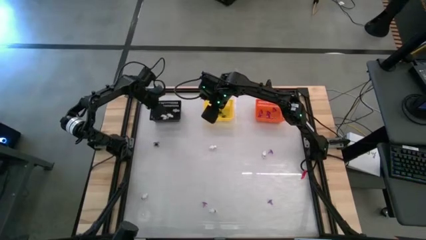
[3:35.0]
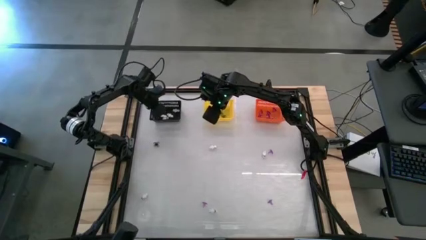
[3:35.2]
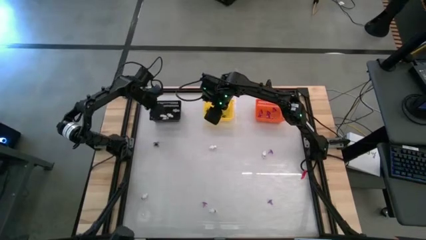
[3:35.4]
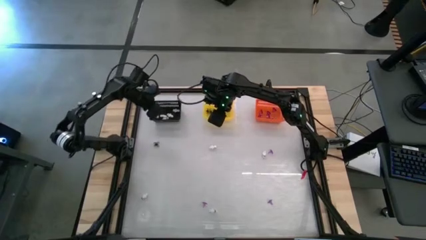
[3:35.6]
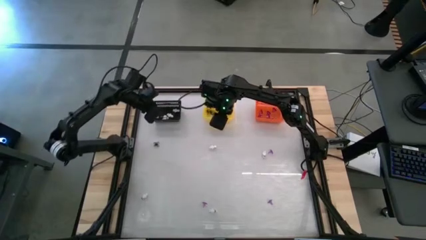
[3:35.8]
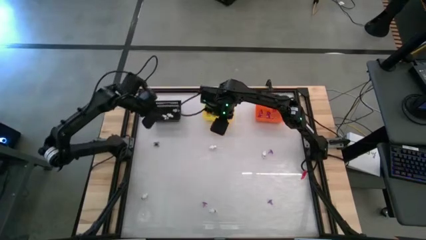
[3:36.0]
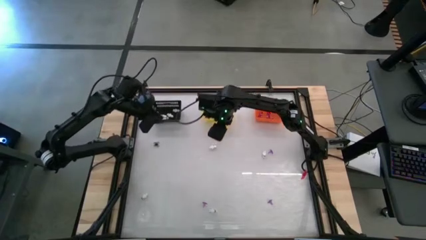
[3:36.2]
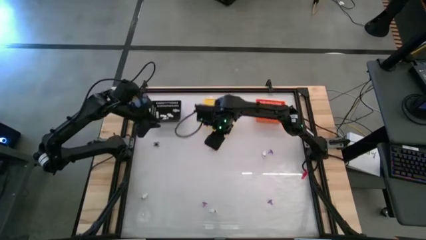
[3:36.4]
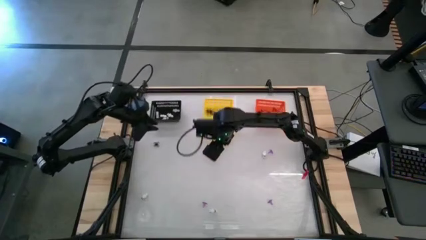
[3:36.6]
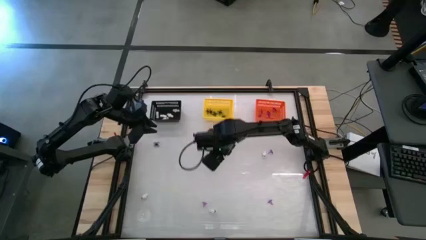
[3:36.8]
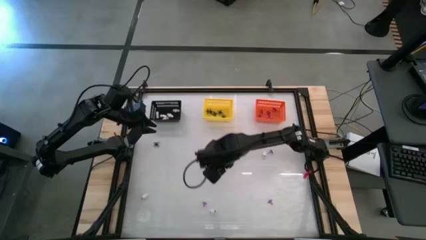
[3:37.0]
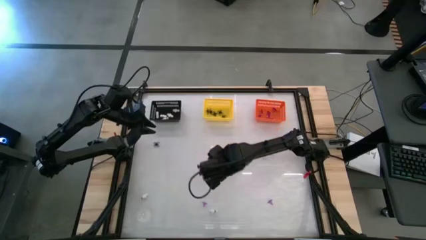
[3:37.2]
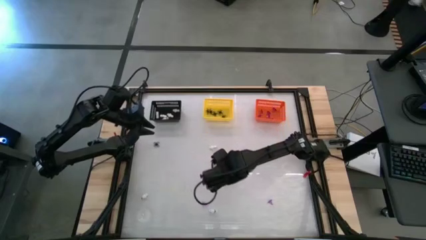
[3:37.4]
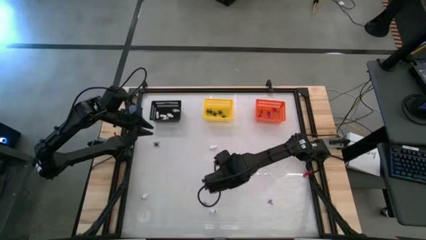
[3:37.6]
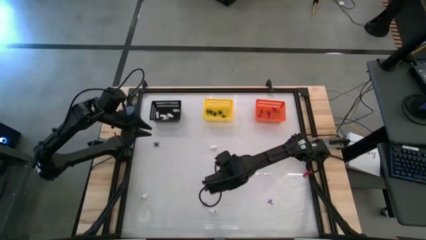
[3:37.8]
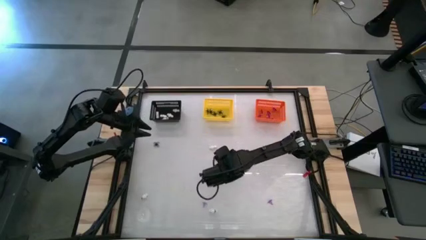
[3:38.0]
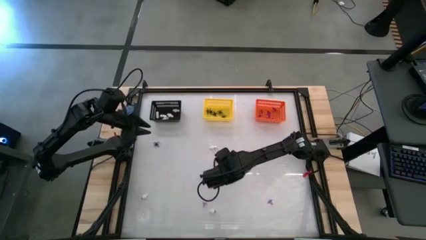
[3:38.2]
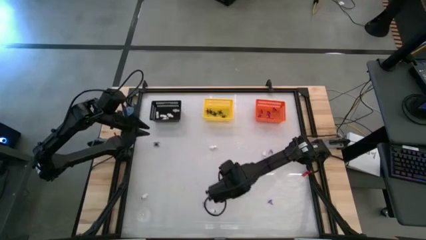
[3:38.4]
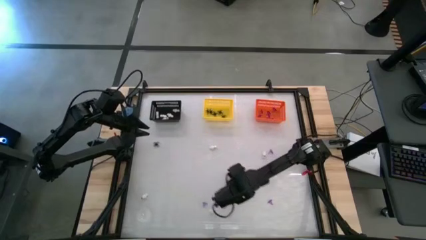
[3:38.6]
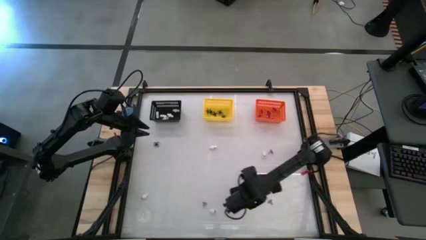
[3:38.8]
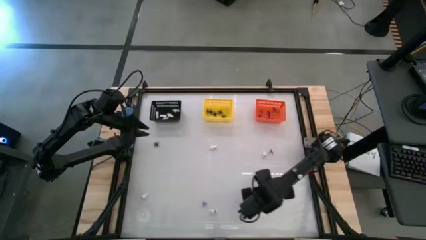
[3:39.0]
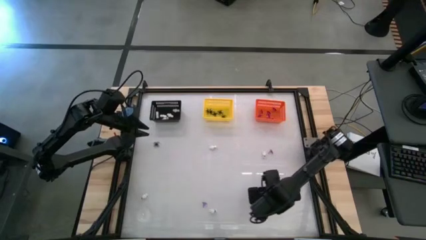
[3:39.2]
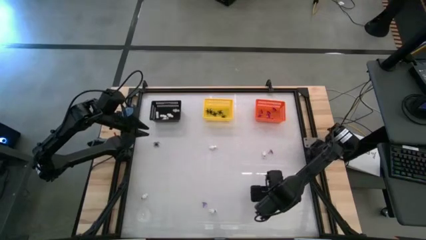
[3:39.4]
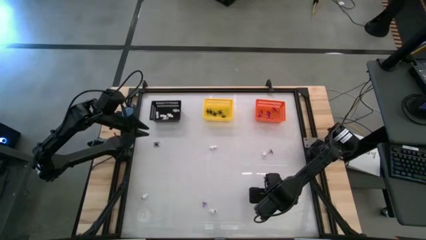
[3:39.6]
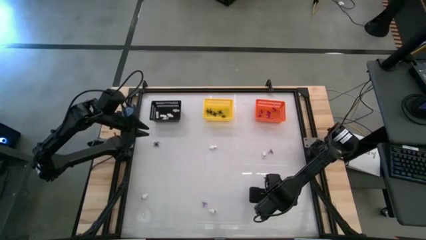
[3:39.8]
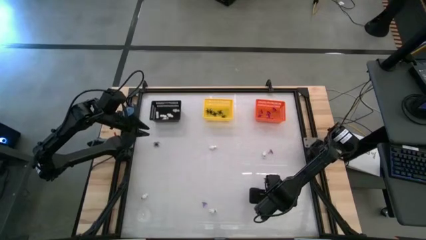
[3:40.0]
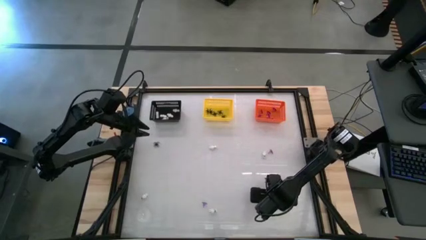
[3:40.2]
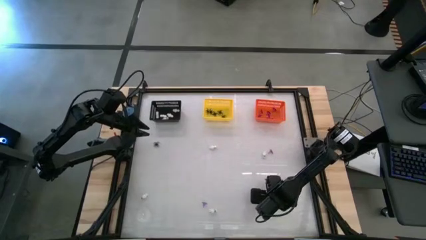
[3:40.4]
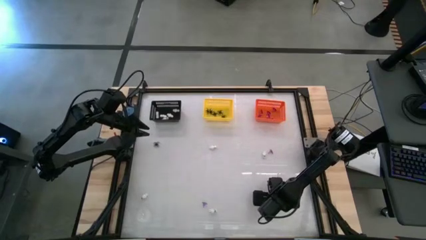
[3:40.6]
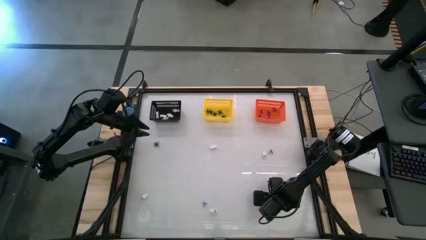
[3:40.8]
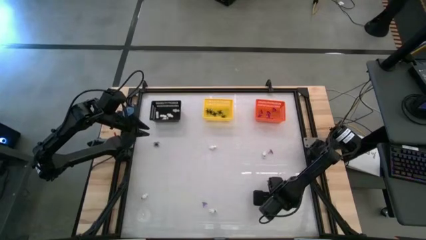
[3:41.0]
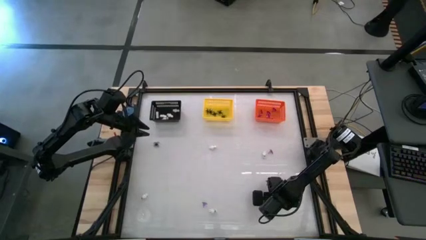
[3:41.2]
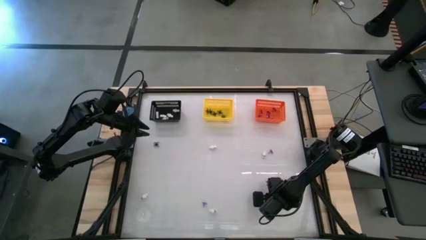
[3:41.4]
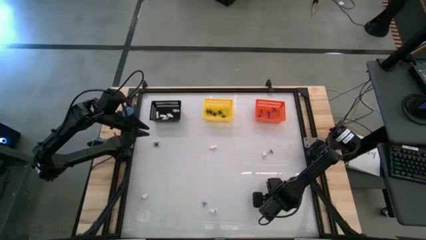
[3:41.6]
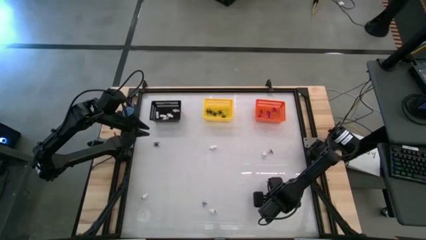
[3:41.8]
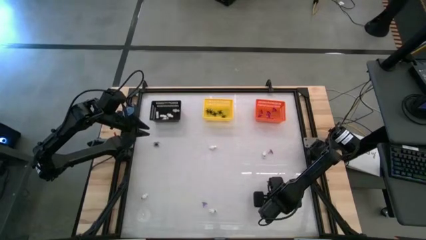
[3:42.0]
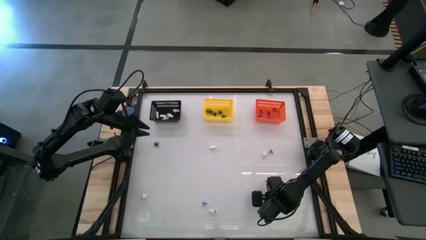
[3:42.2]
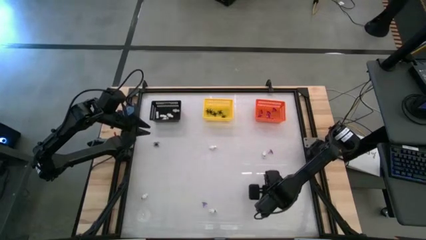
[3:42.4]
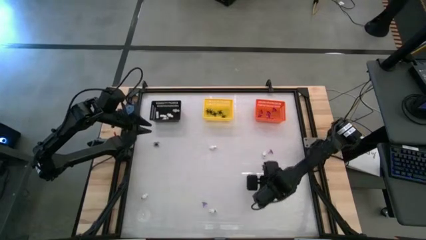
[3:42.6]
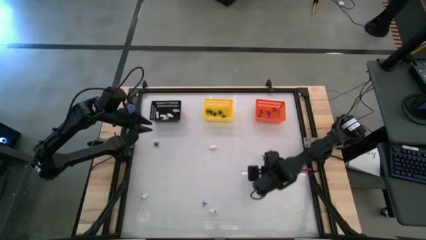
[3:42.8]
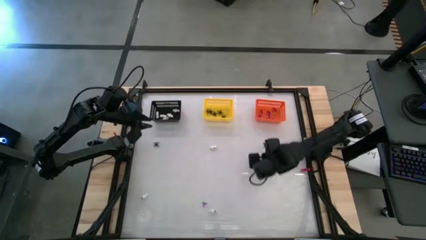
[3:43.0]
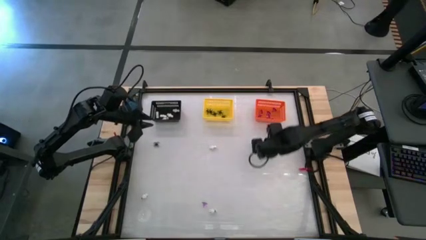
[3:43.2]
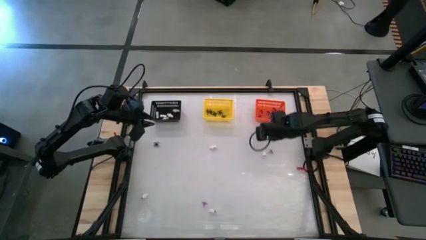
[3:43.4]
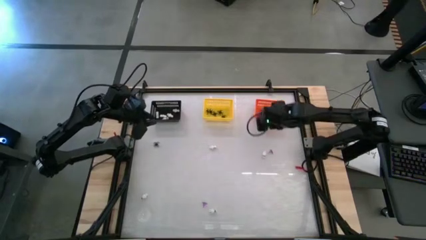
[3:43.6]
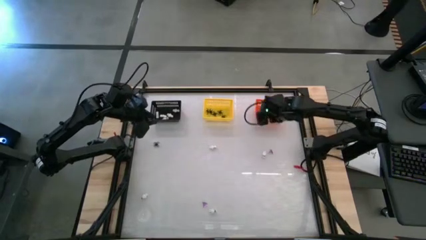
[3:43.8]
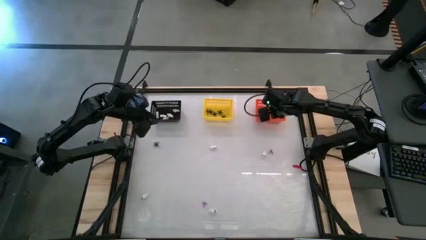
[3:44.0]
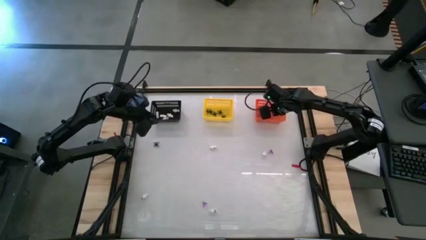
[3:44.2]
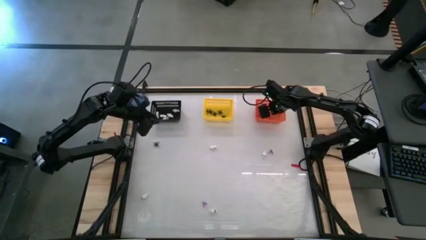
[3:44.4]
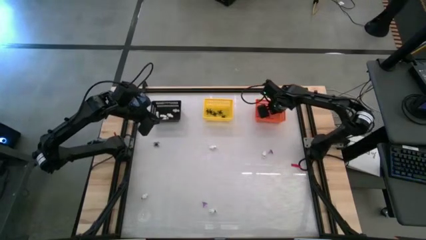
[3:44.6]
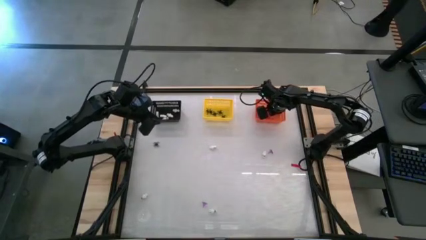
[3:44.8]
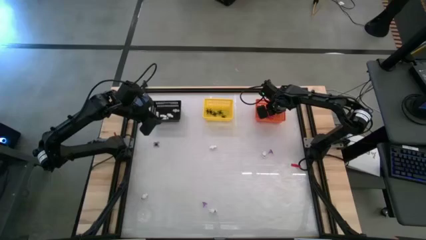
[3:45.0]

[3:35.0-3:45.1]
Task: Sort Halloween decoration
Put the purple witch hat toy into the orange basket

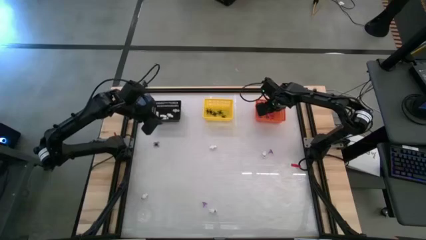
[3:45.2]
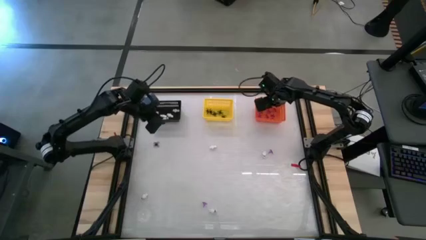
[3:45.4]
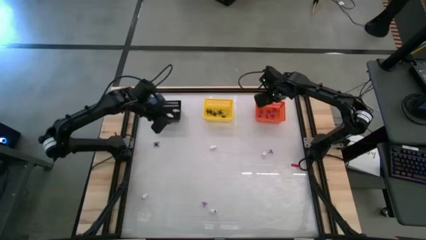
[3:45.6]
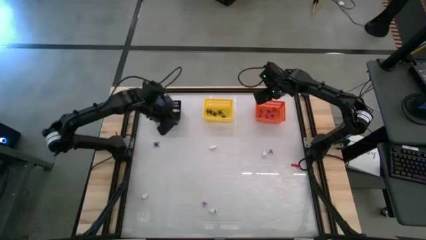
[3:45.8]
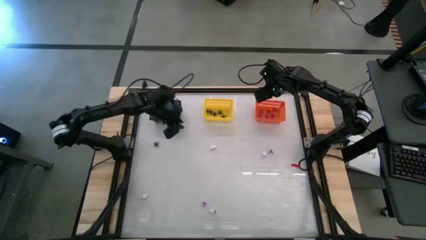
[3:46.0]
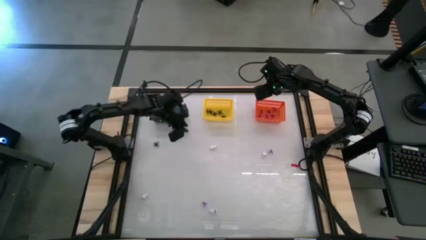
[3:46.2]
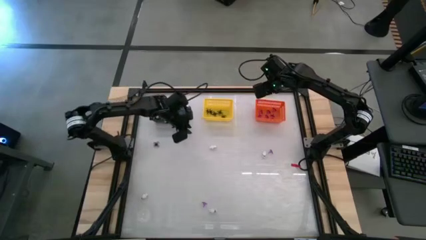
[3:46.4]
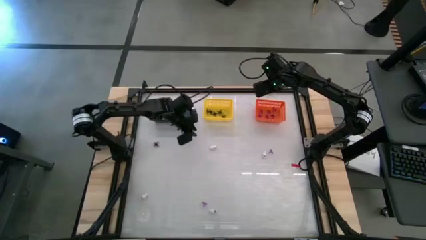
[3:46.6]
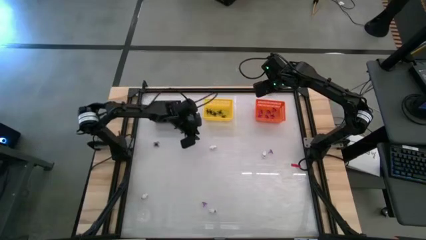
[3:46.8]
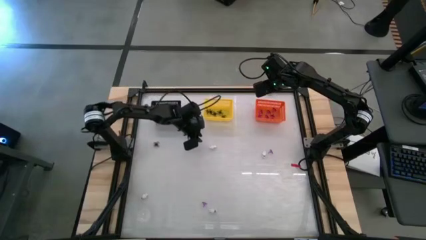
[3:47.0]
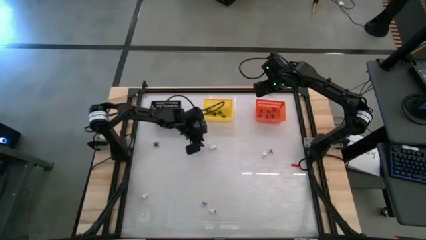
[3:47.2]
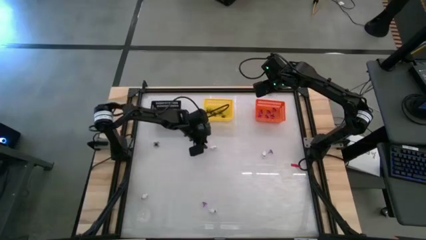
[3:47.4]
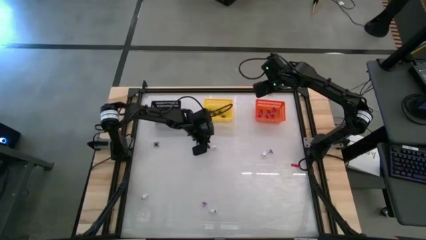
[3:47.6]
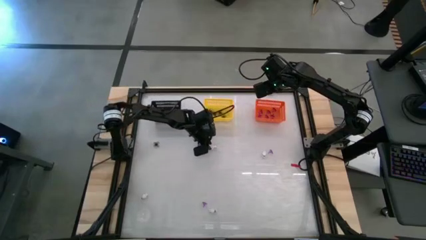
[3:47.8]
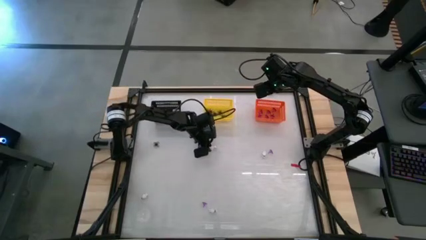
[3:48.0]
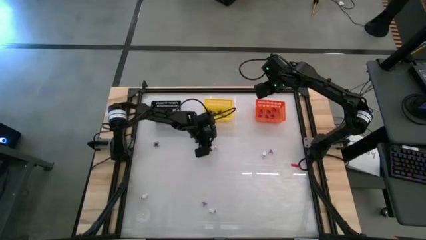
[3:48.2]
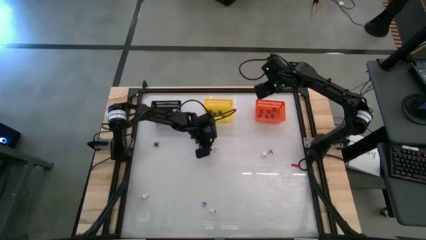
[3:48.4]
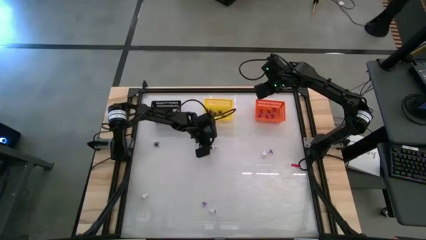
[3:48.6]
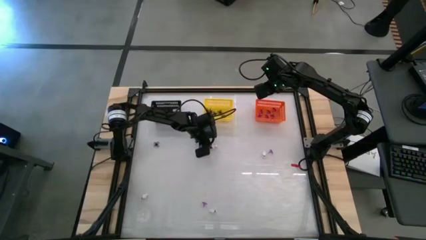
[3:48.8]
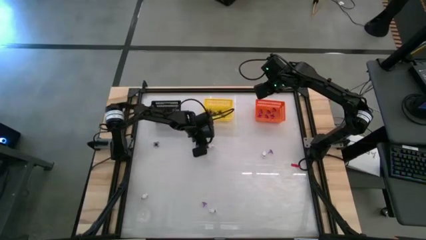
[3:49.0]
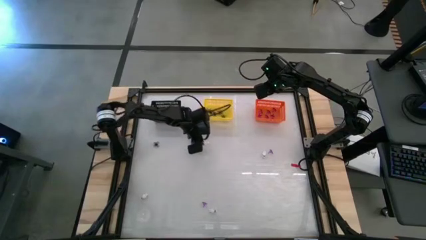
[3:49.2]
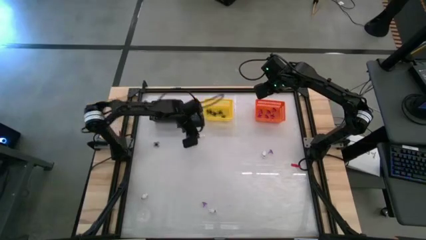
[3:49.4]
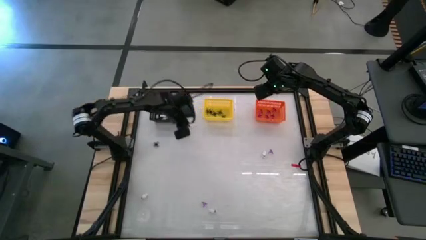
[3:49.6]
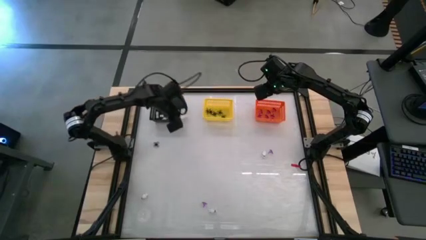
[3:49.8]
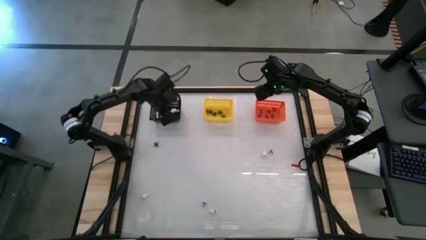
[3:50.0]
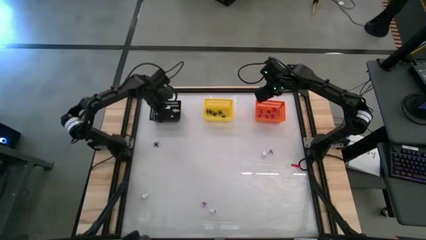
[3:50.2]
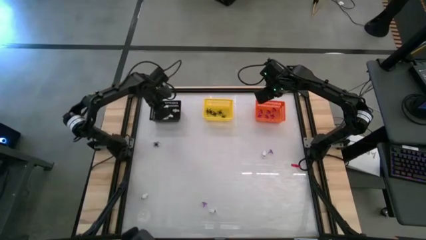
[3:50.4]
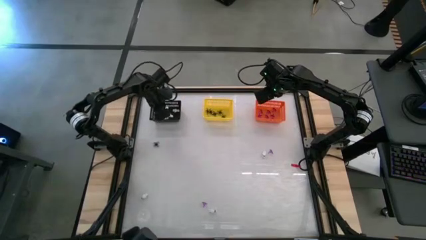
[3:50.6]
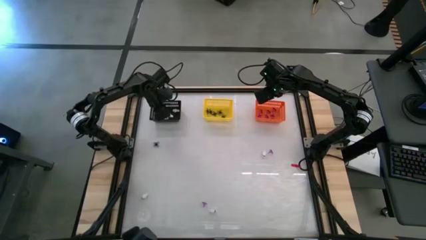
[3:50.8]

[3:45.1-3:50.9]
Put the white skeleton toy into the black basket
